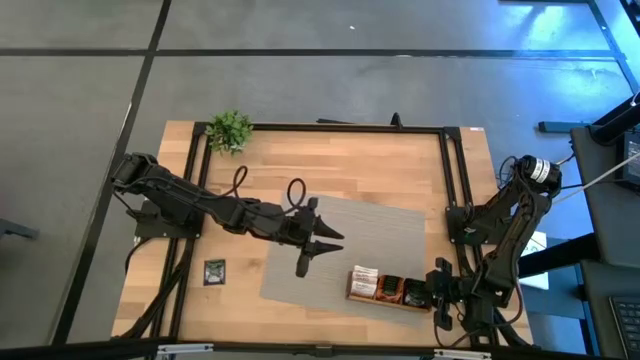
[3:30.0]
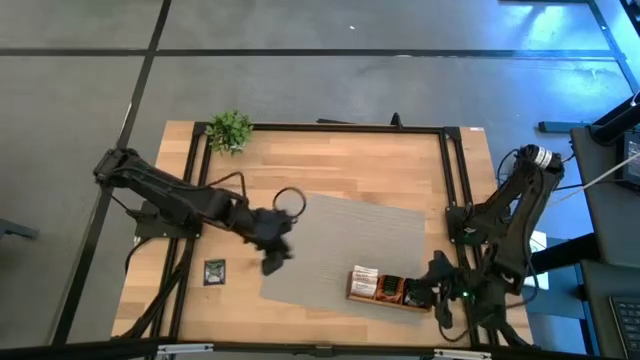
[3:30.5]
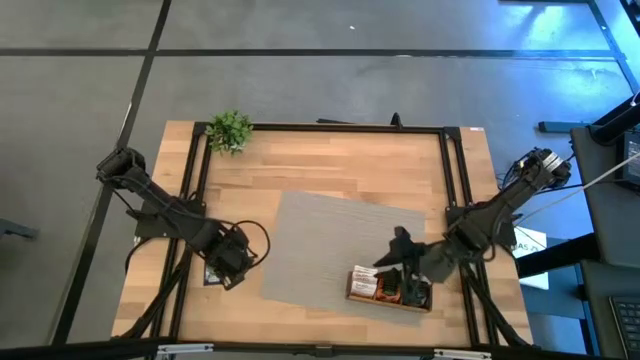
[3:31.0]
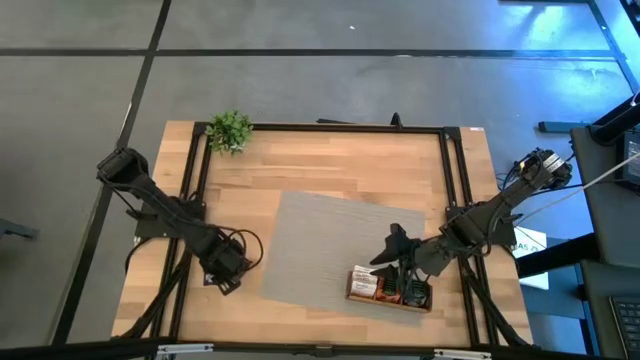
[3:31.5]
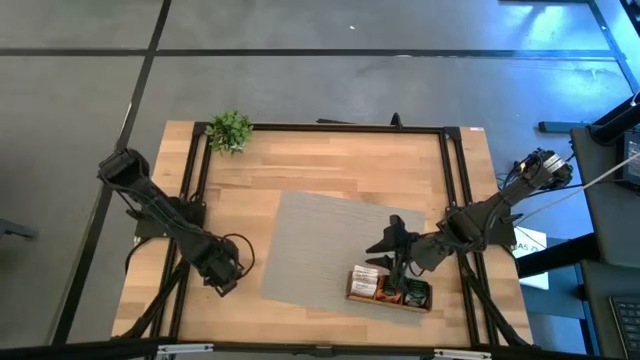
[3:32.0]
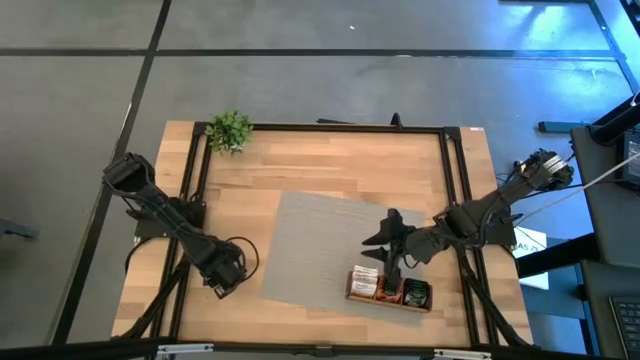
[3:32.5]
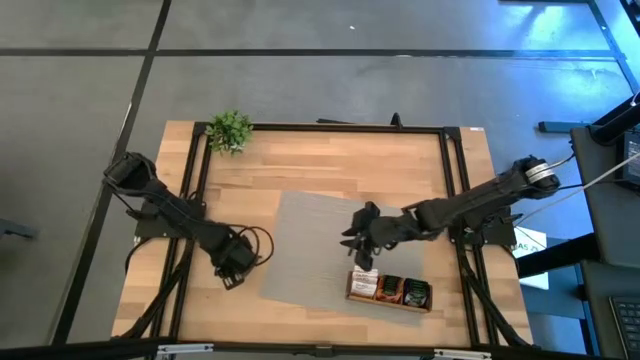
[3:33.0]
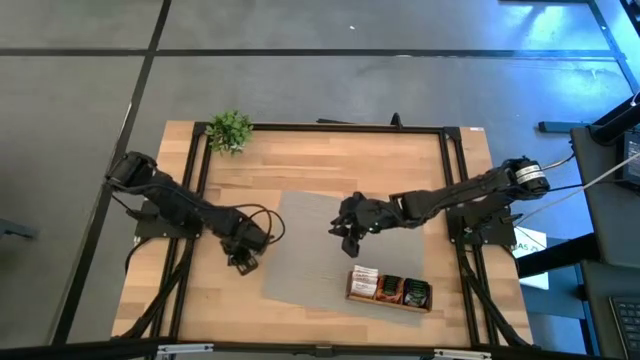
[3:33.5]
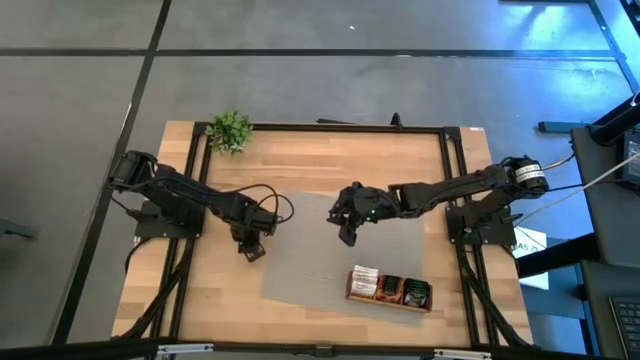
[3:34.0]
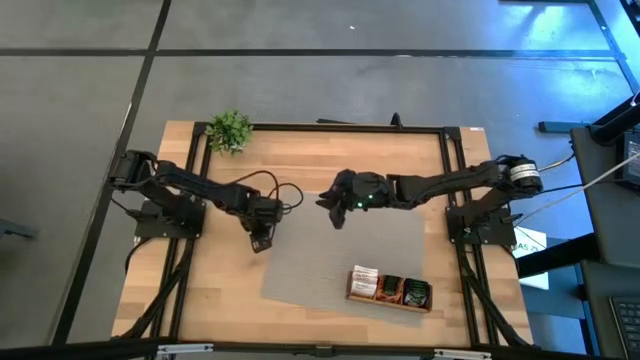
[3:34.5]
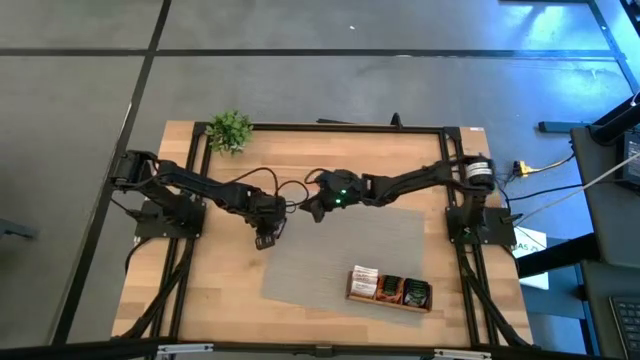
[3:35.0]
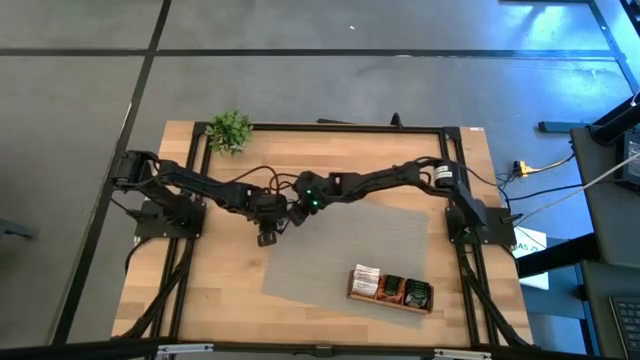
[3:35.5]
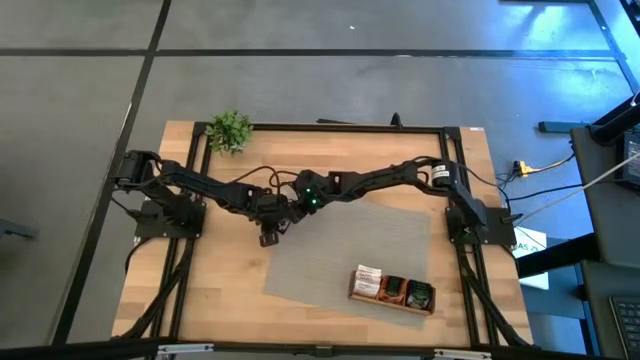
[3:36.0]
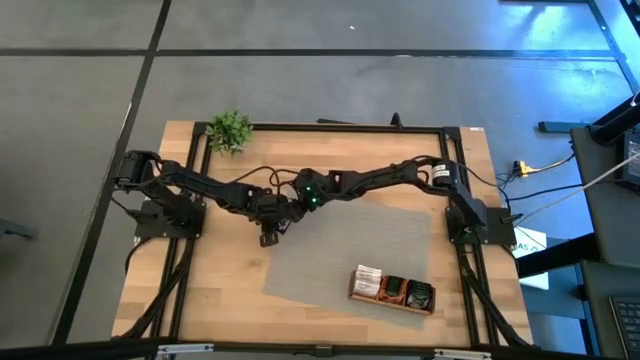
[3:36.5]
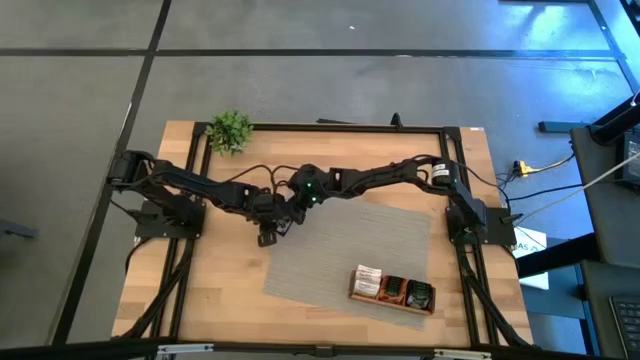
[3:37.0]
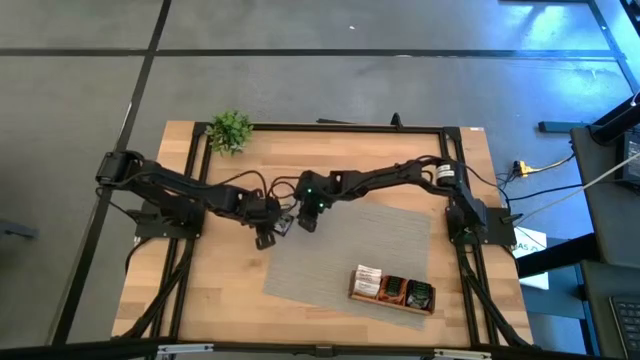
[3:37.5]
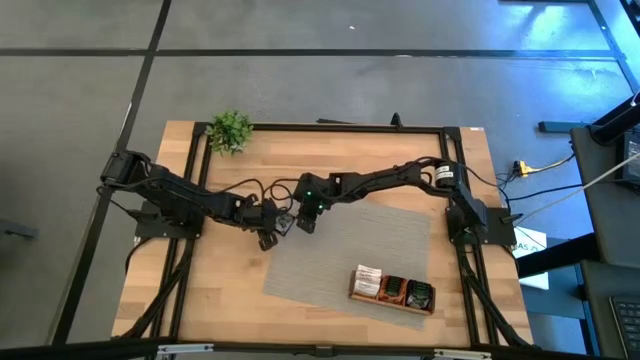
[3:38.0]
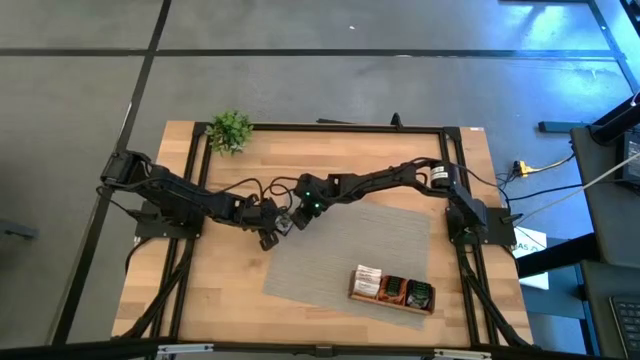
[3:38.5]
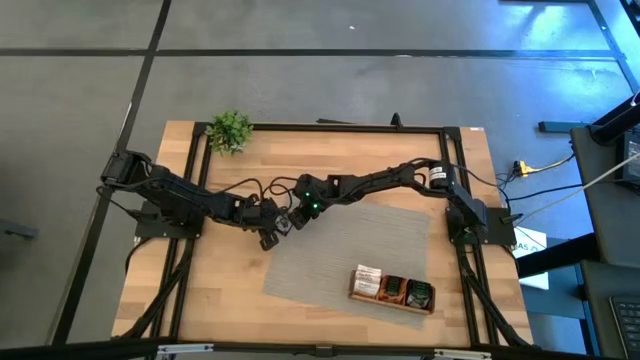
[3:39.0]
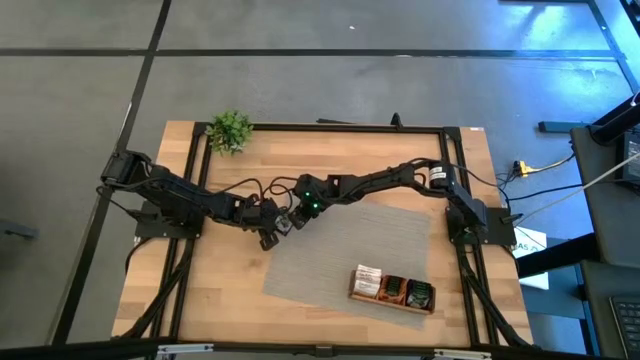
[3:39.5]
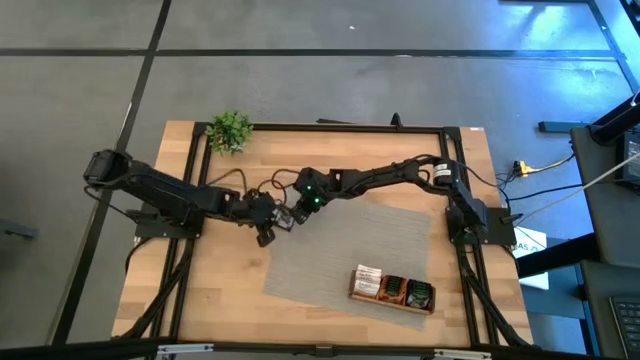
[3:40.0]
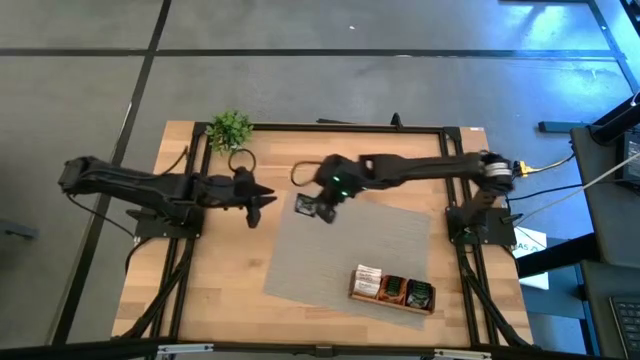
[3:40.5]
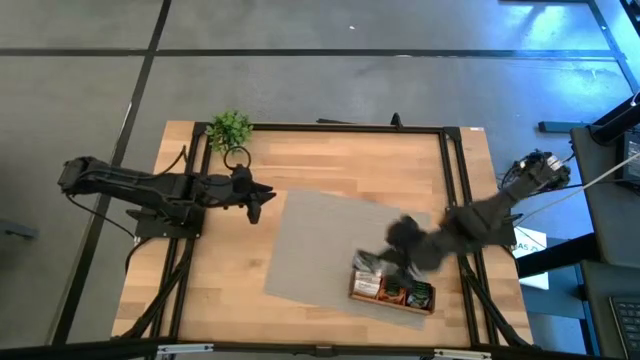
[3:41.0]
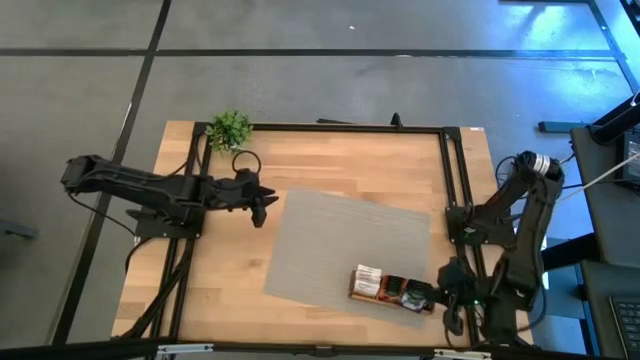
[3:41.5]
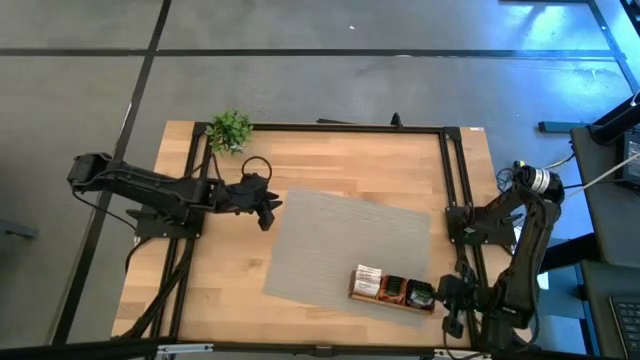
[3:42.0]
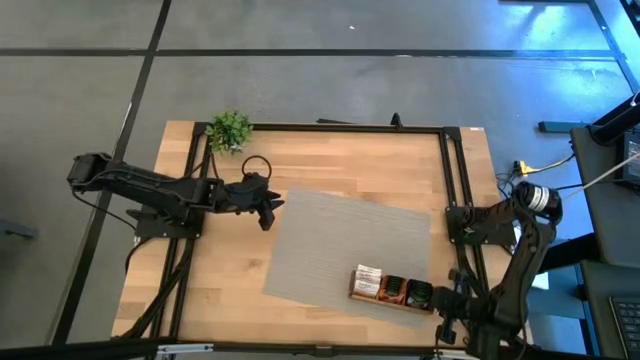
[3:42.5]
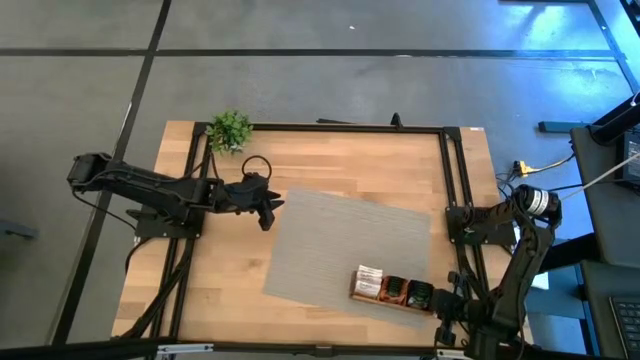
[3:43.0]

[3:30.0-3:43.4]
Task: Pick & Place Tea
Put the black tea bag into the right compartment of the wooden organizer

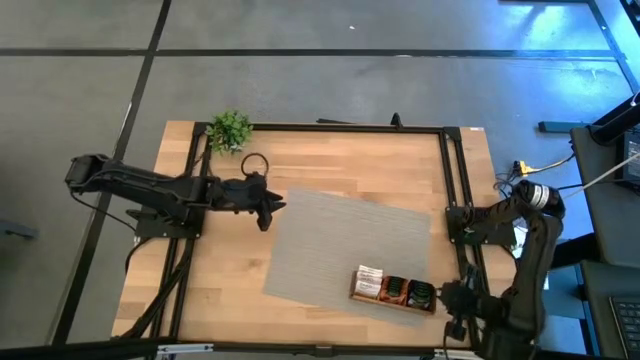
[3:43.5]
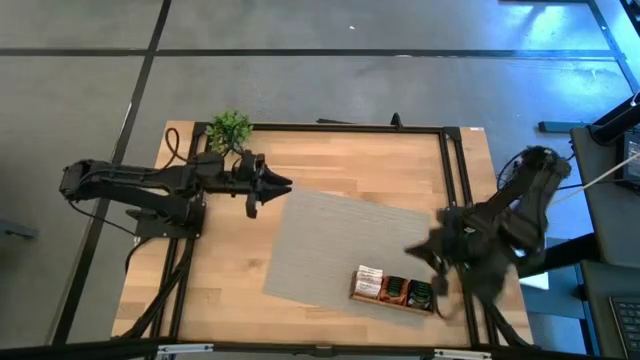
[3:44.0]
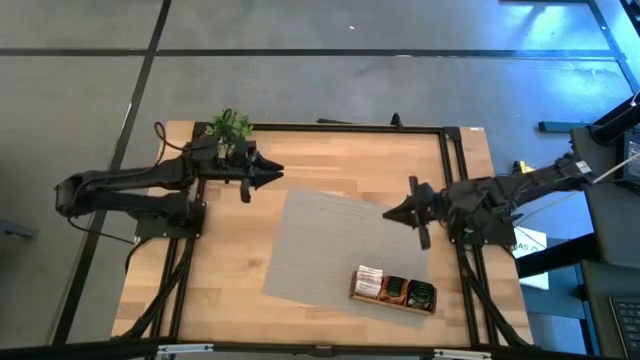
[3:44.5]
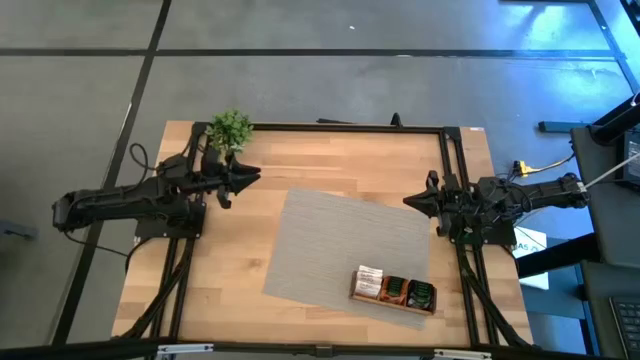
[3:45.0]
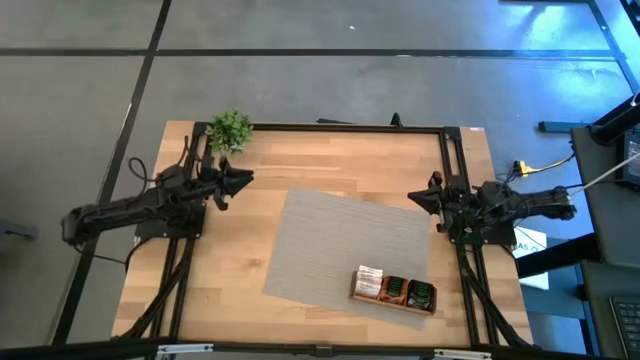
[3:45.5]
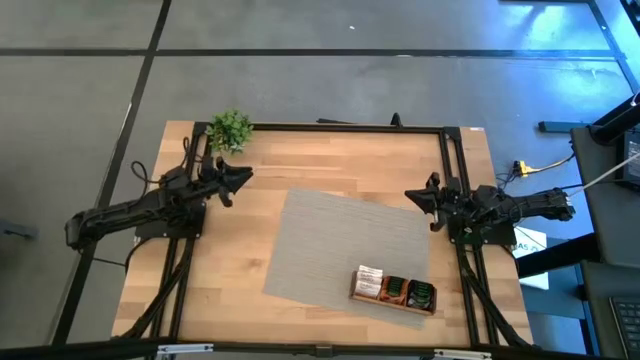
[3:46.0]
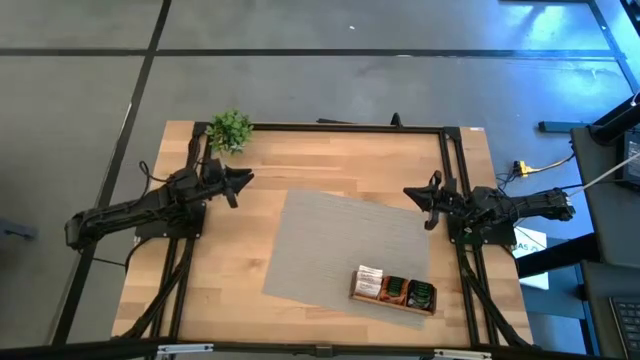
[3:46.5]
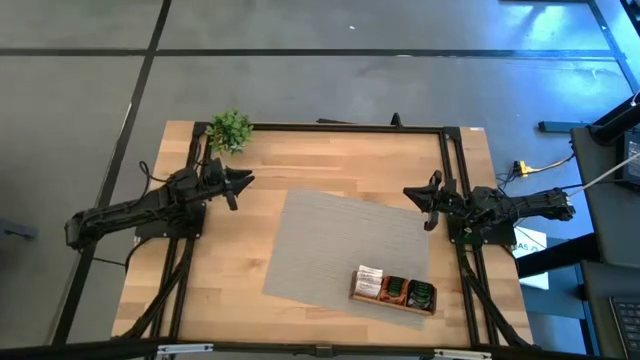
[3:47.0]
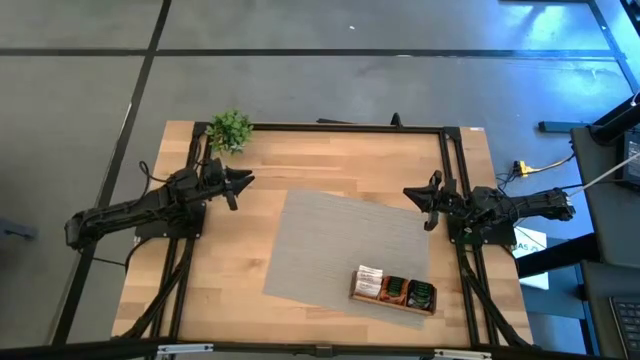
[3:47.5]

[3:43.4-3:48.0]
Return to Home Position

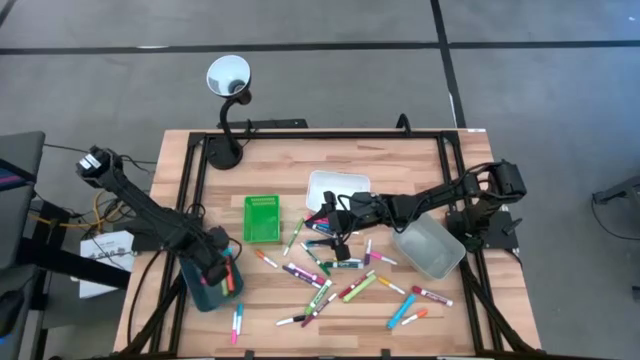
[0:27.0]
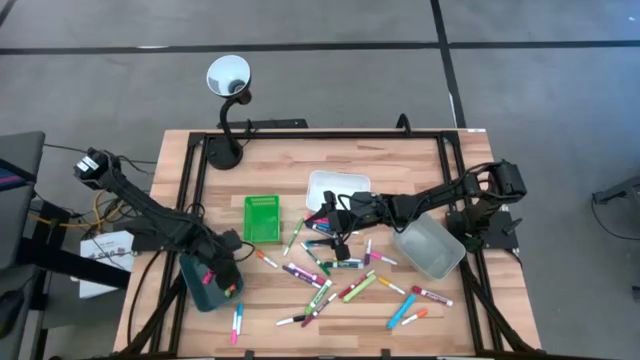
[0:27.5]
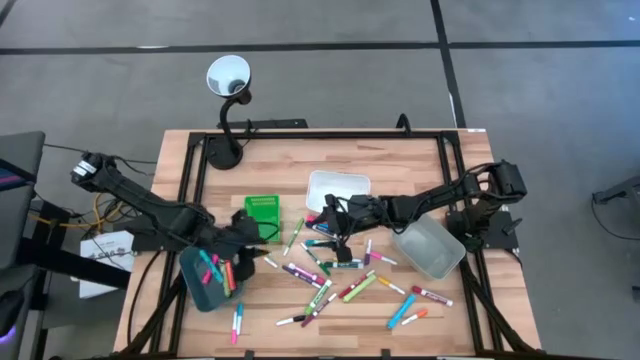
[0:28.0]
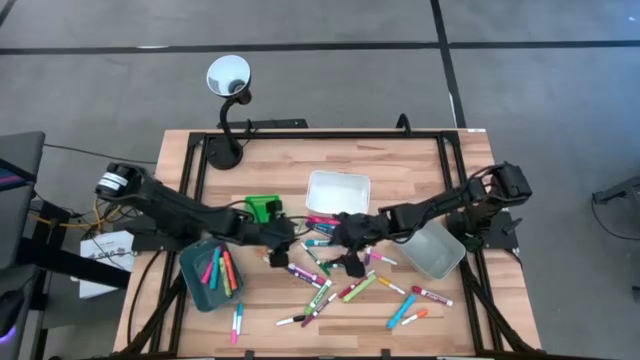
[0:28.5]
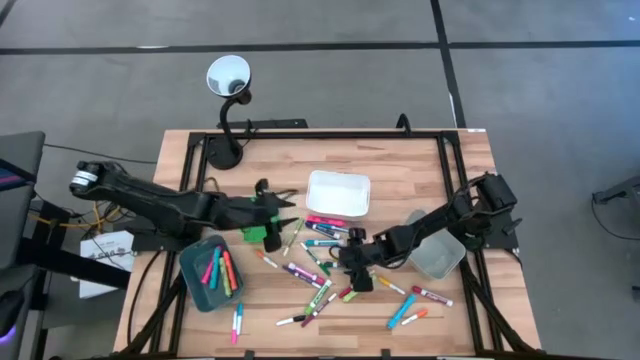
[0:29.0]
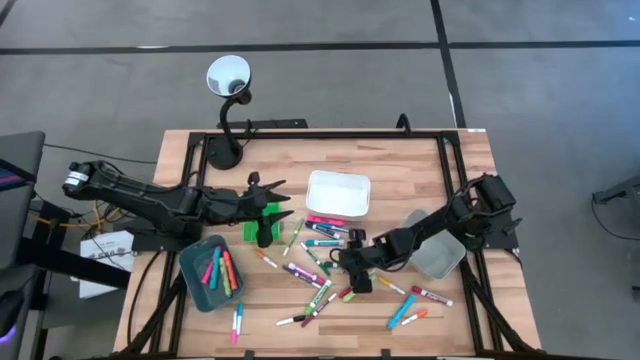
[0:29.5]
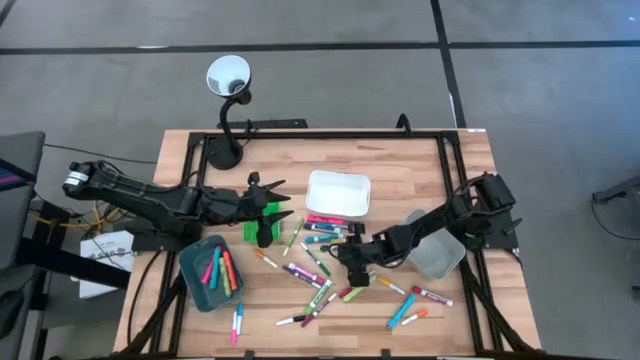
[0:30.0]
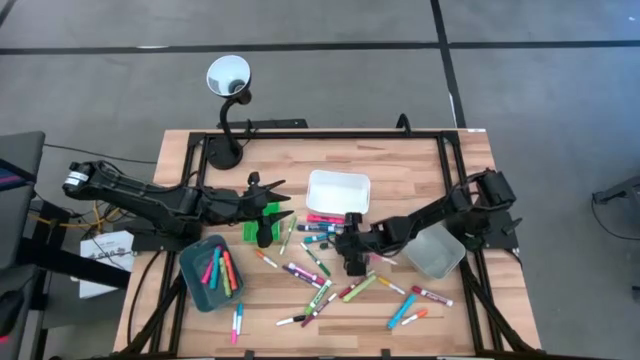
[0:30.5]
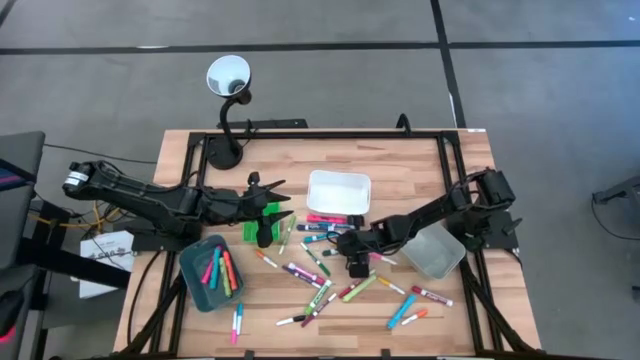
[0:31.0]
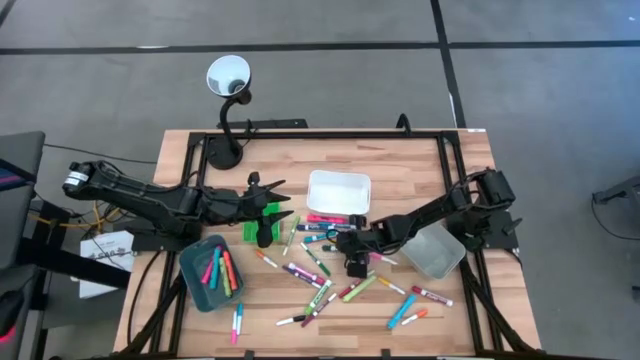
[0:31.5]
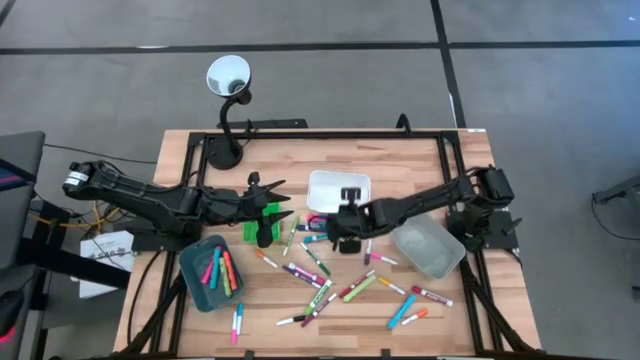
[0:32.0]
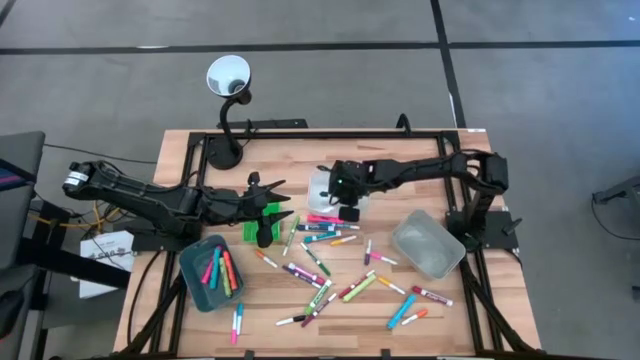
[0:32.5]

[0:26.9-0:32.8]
Task: Pick & Place Markers
Put the big green marker pen into the white bin
